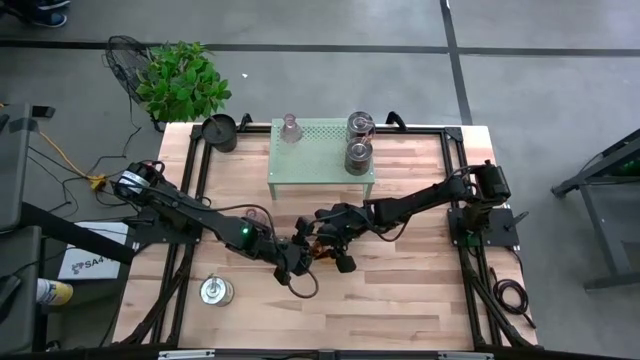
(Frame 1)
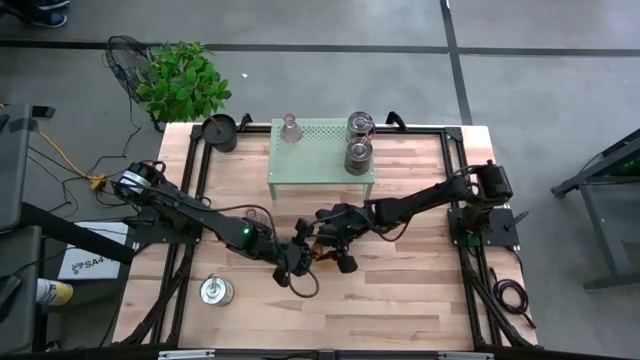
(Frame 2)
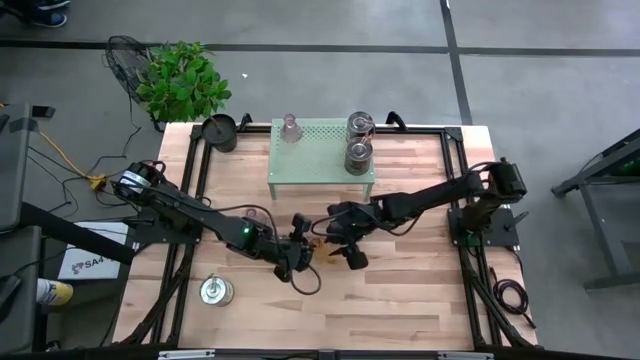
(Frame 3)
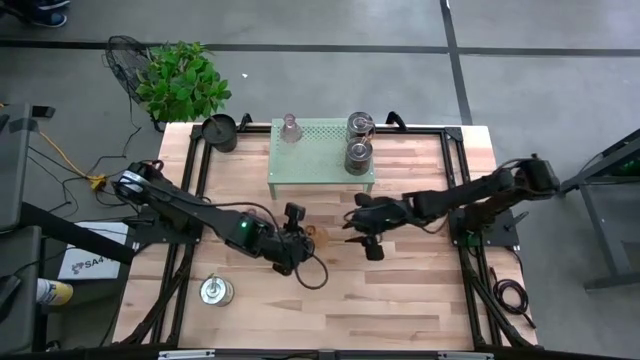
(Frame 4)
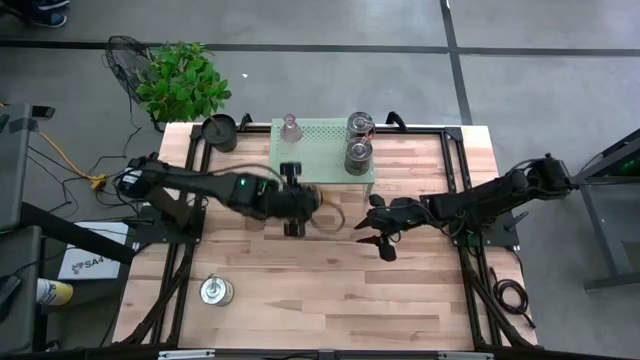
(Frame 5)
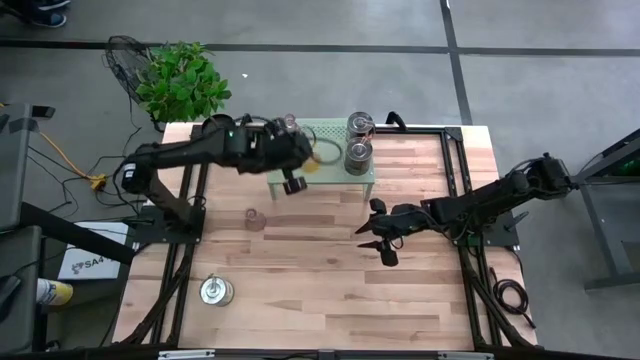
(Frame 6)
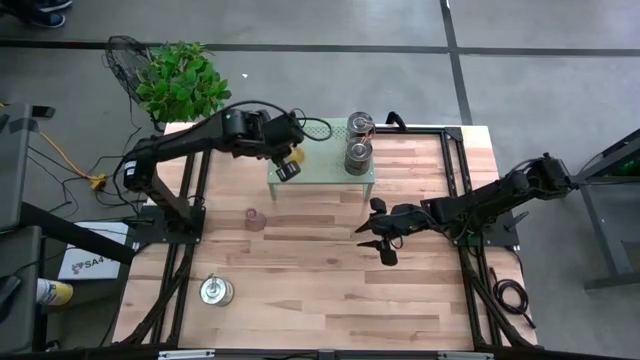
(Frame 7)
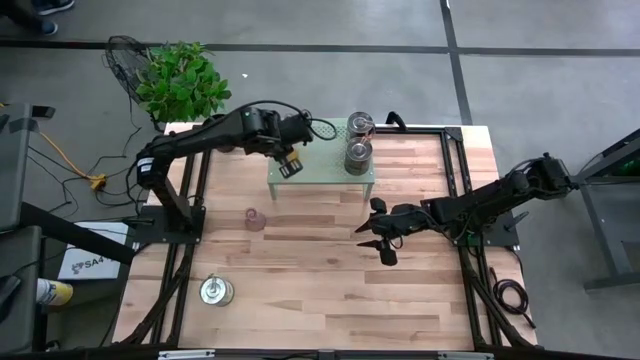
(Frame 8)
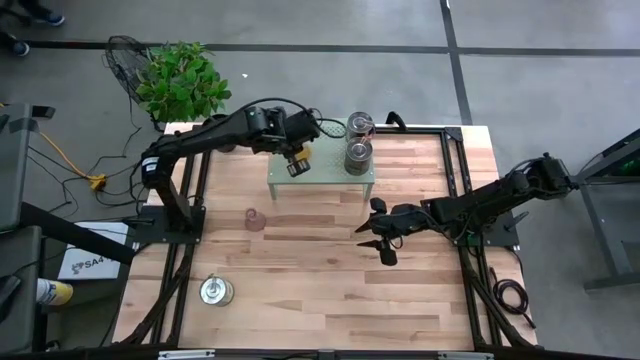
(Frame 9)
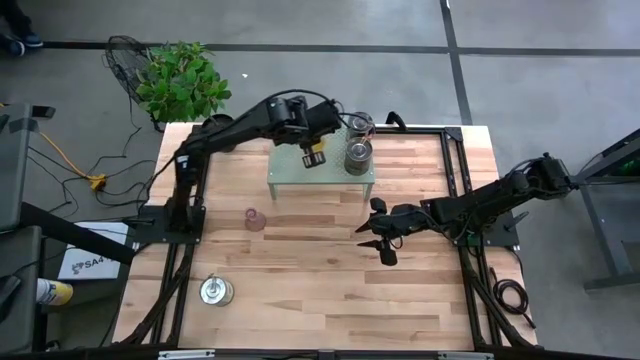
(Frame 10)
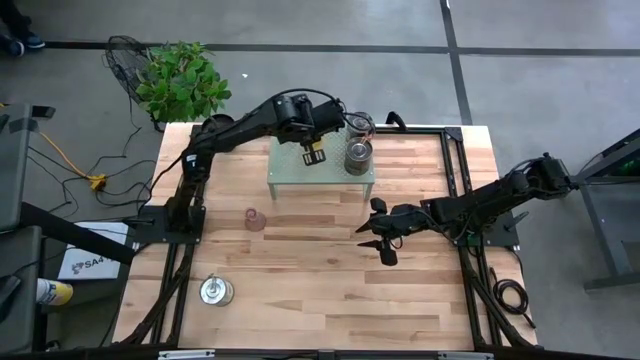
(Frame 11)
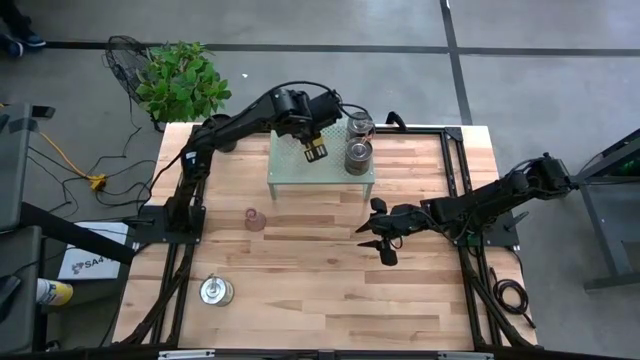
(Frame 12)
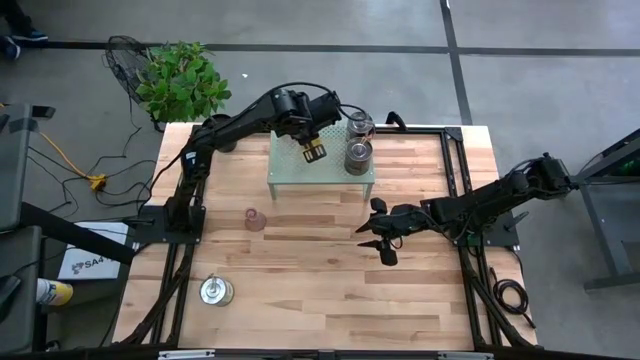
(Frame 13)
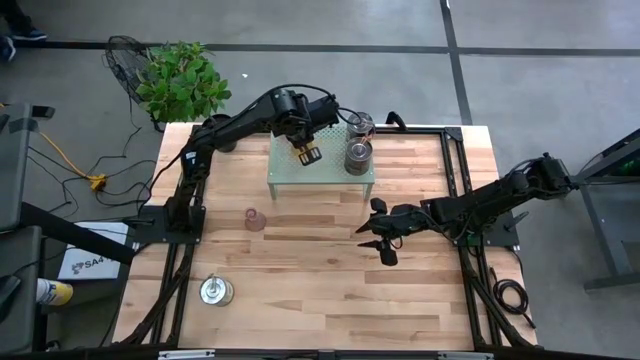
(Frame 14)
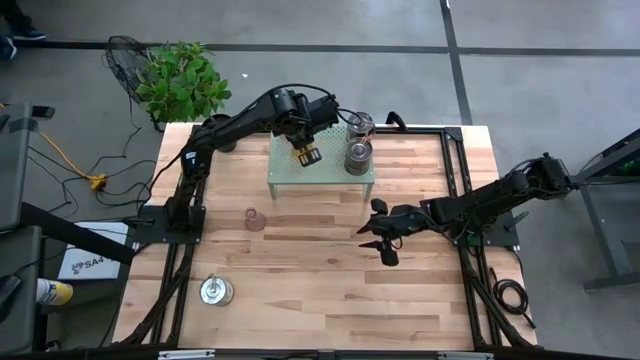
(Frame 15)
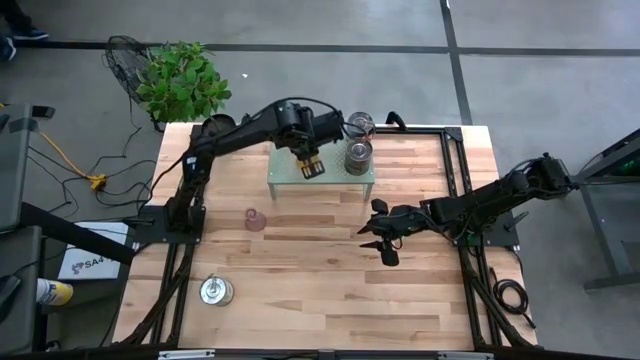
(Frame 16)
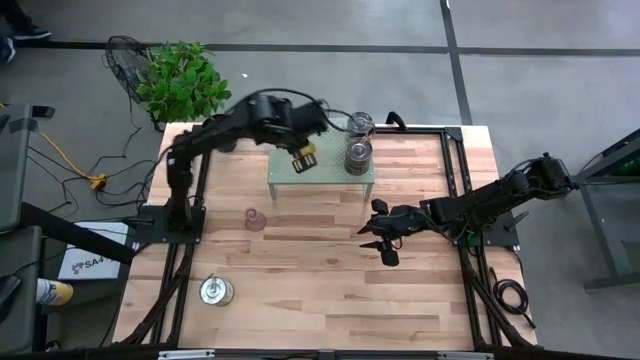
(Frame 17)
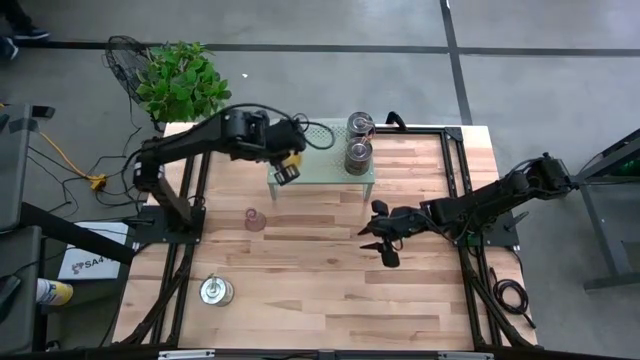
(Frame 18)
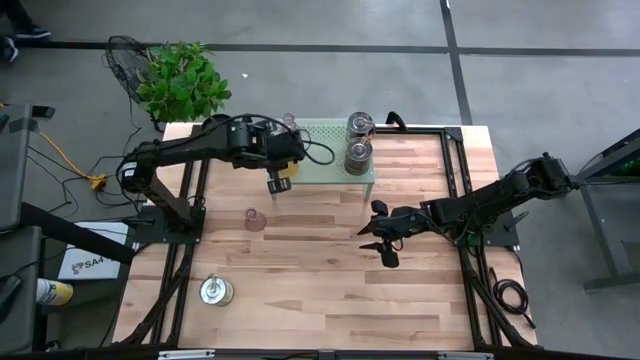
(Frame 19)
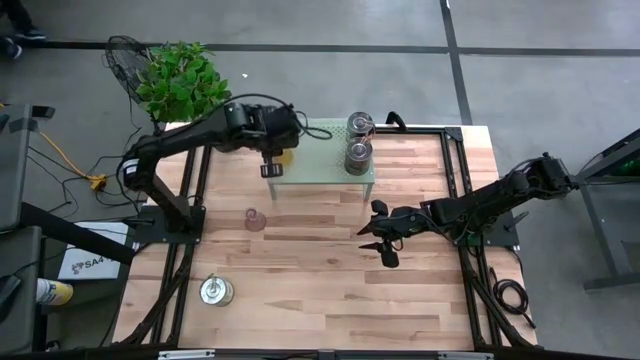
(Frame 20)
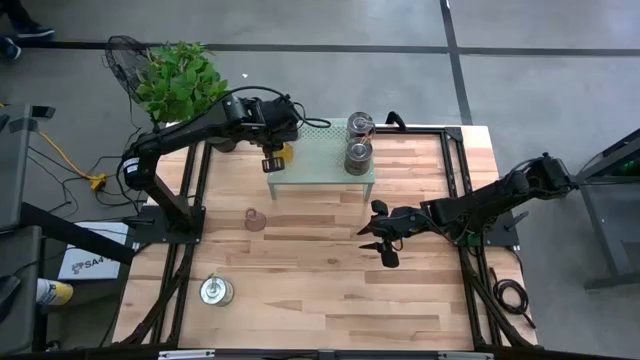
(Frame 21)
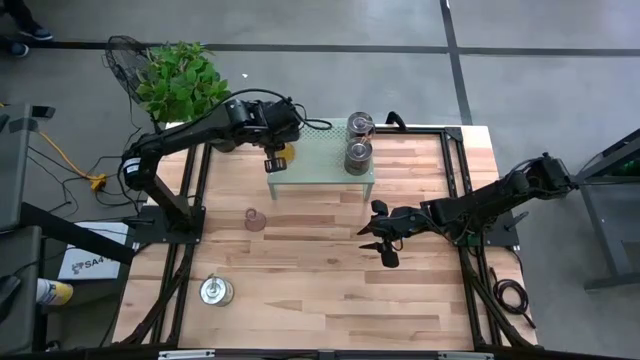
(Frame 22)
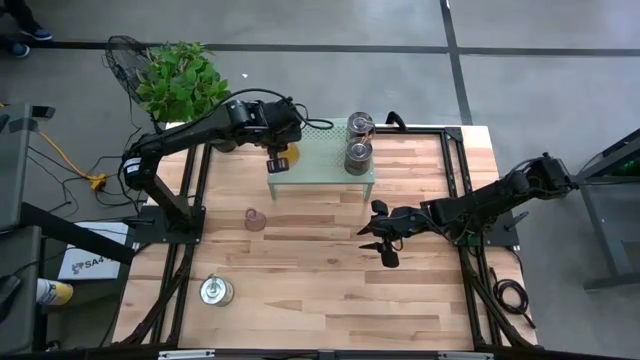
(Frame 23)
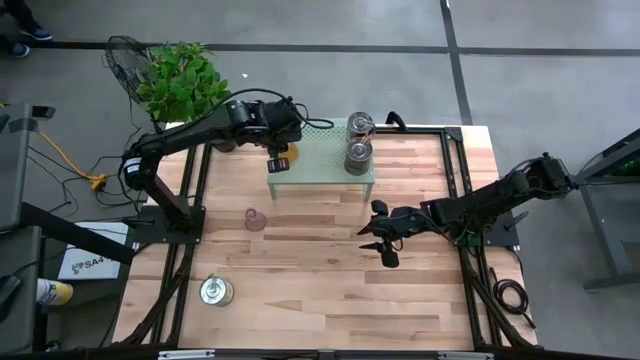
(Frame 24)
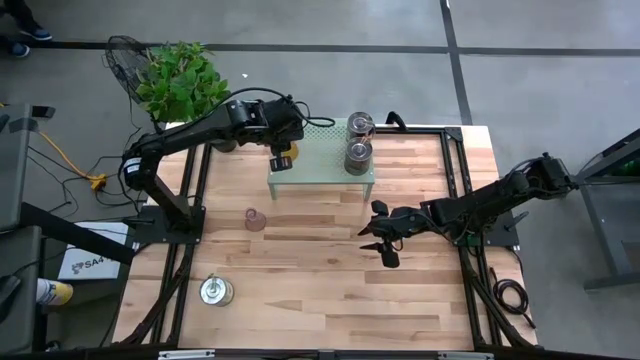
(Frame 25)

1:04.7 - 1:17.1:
Task: Pick & Place candle stick holders
Put the yellow candle holder on the shelf

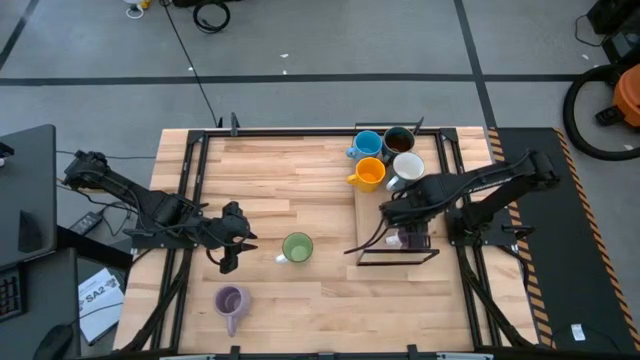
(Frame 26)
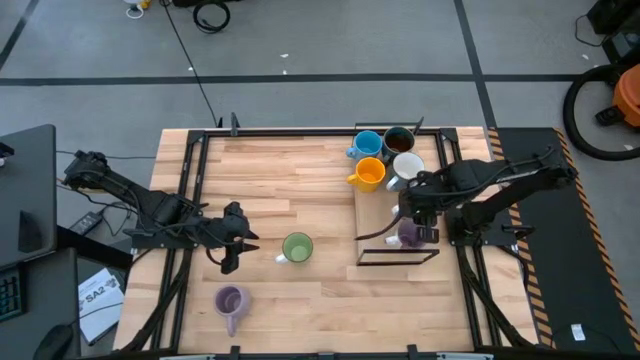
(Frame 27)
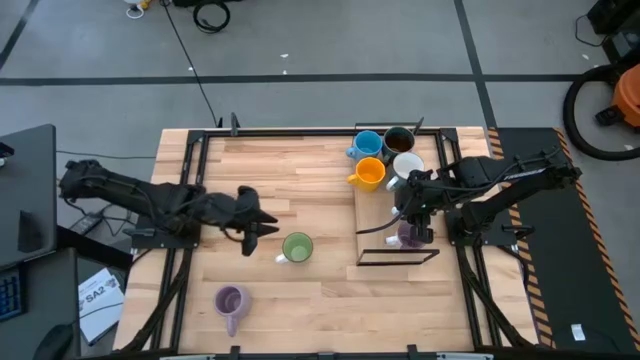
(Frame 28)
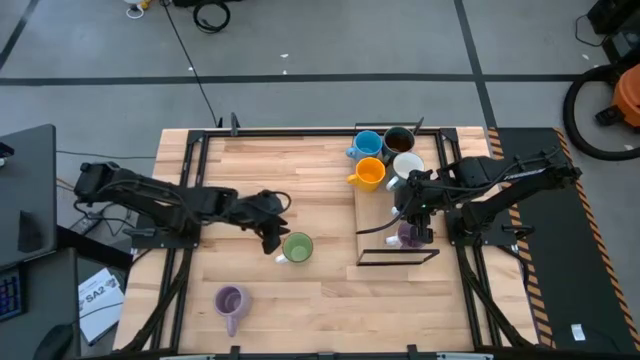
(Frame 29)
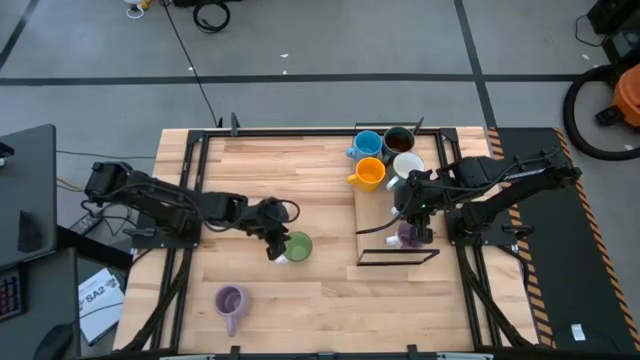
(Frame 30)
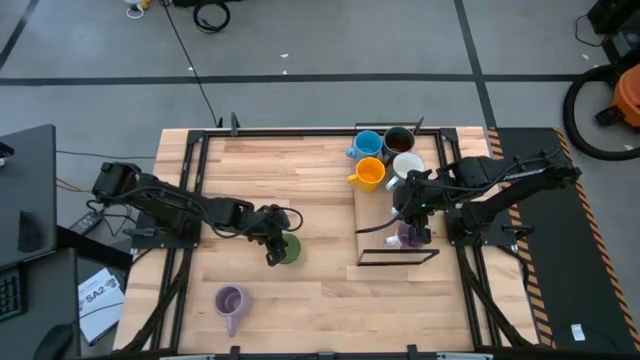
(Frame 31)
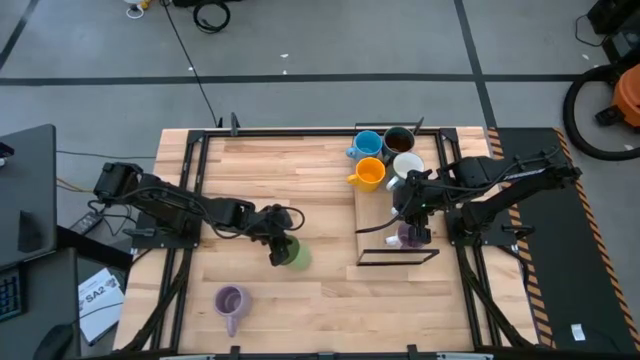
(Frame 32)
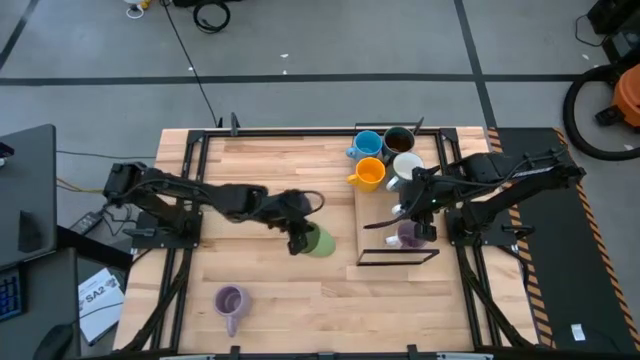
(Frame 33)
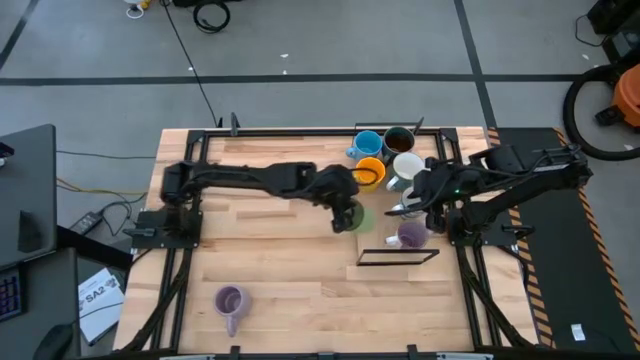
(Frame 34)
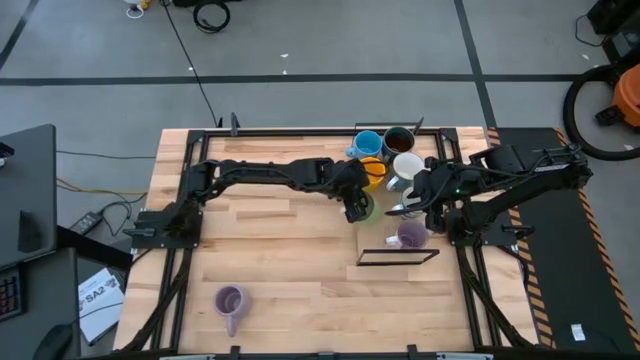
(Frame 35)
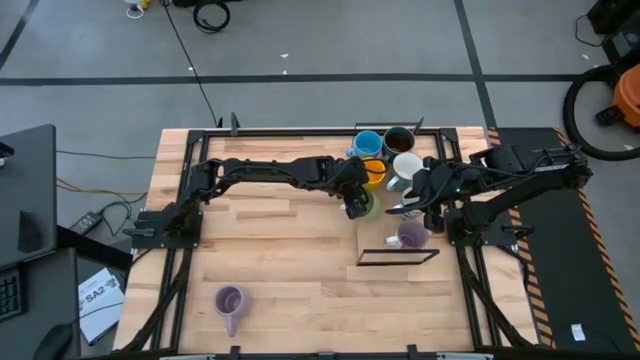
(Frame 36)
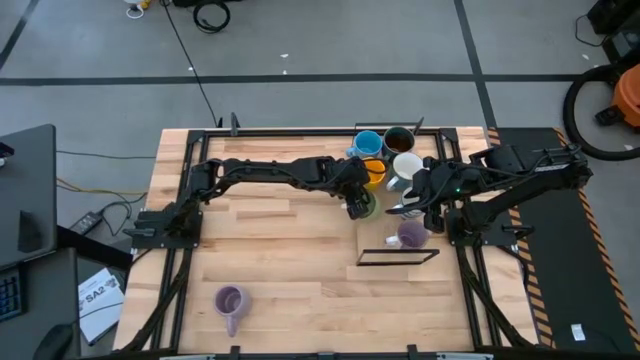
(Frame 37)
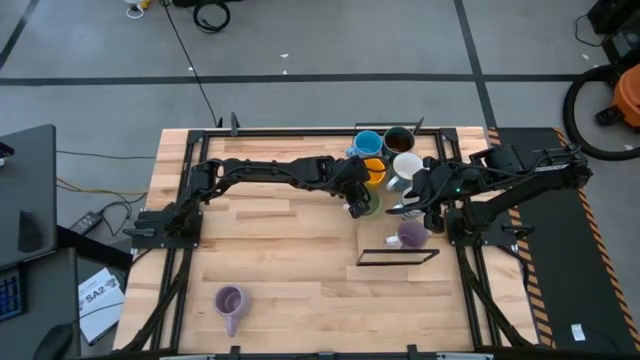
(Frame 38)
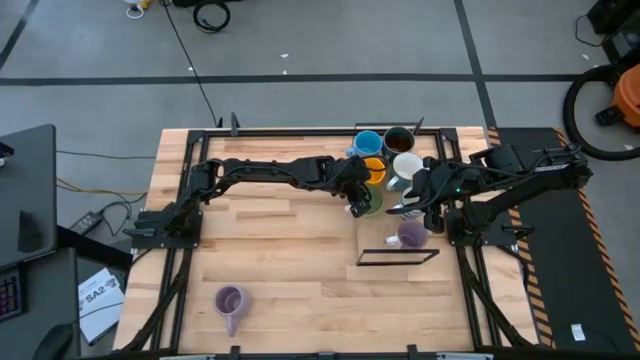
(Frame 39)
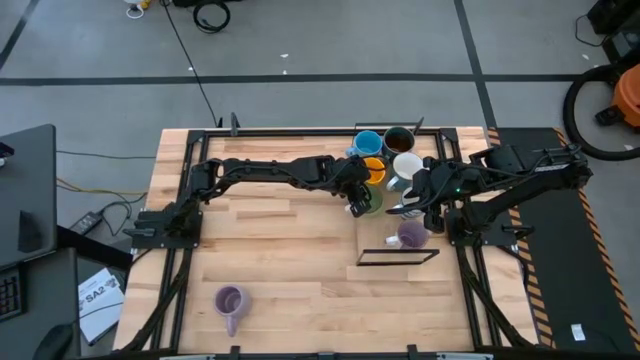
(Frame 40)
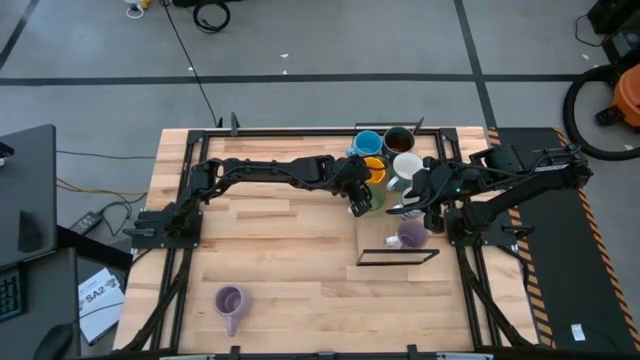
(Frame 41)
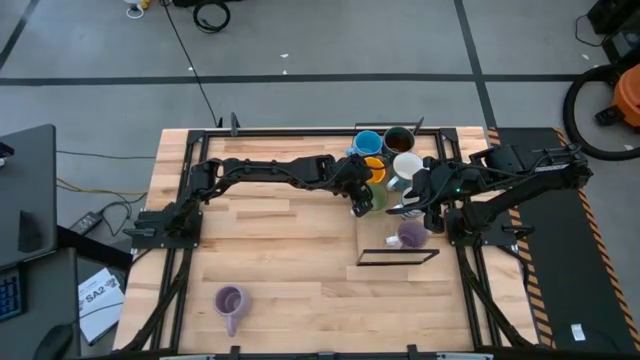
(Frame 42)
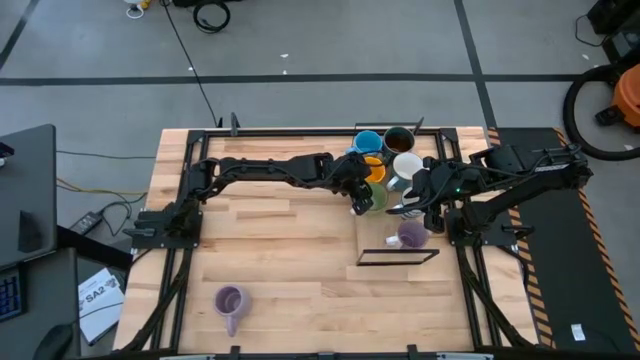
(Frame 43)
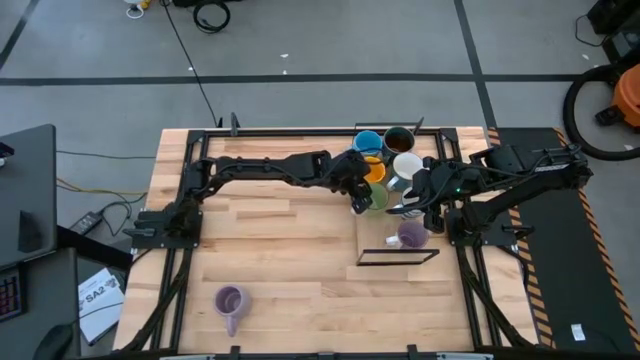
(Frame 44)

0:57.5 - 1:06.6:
Task: Place coffee mugs
Put the green mug on the shelf
